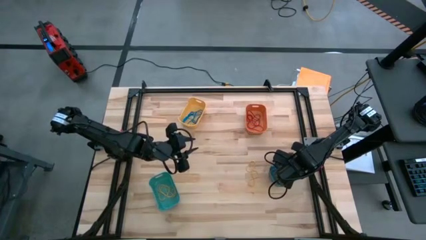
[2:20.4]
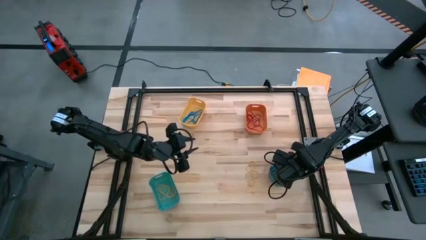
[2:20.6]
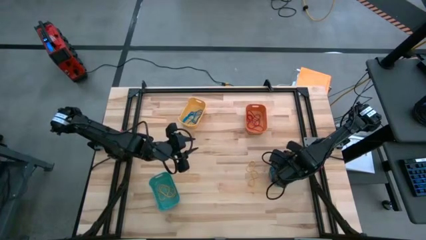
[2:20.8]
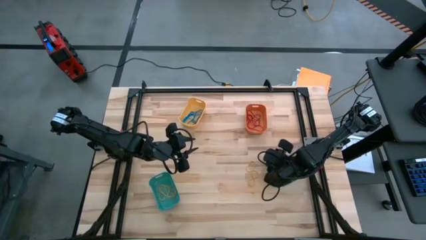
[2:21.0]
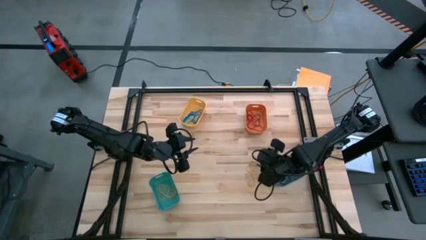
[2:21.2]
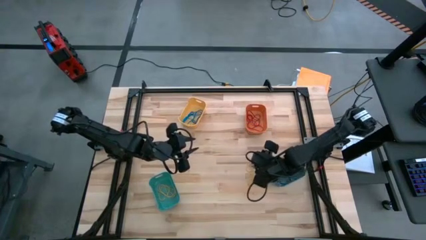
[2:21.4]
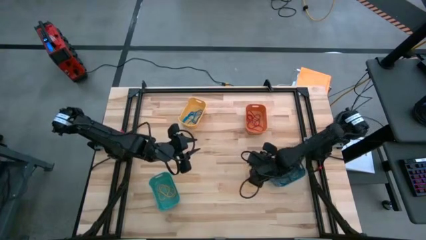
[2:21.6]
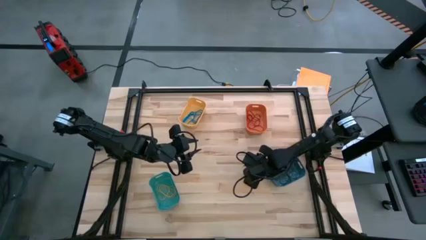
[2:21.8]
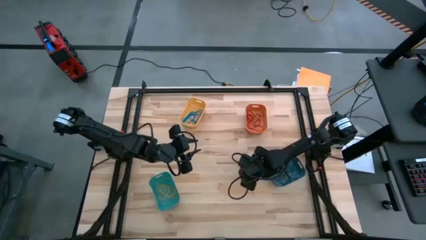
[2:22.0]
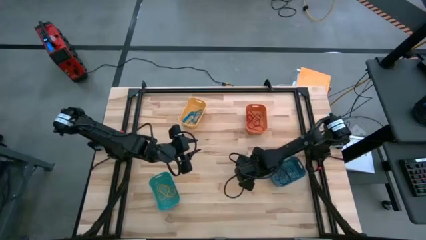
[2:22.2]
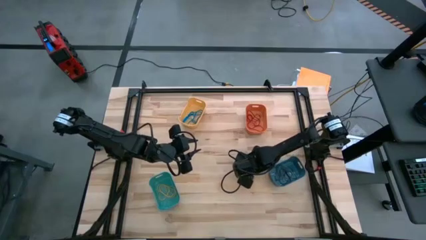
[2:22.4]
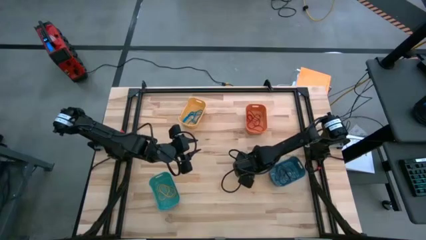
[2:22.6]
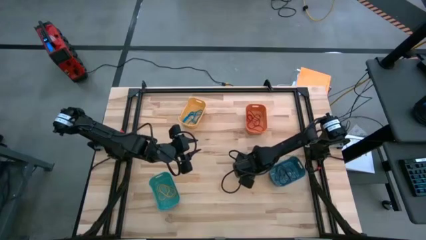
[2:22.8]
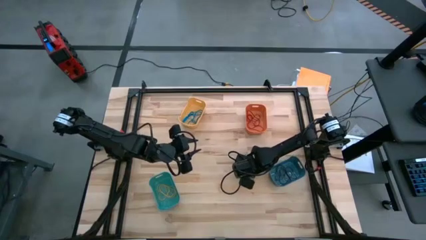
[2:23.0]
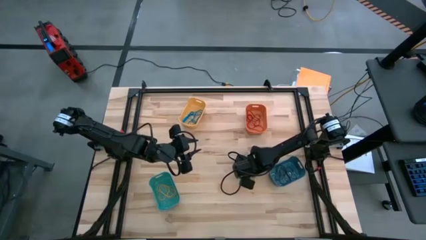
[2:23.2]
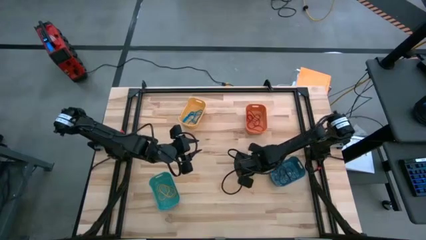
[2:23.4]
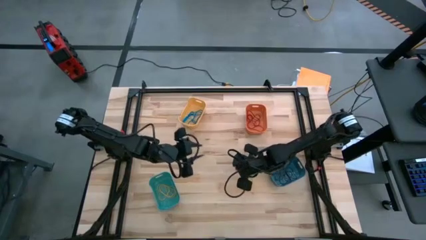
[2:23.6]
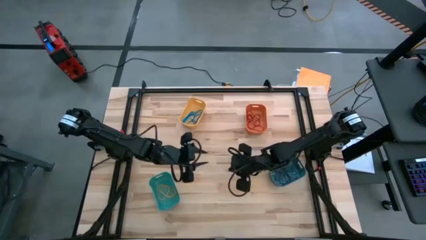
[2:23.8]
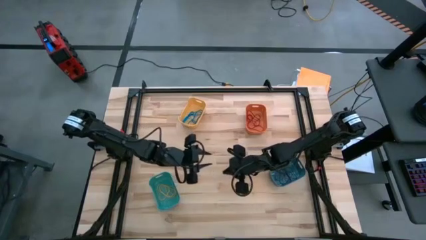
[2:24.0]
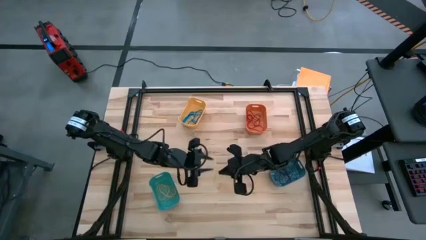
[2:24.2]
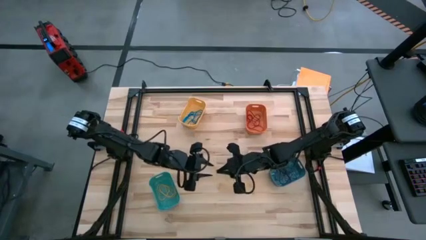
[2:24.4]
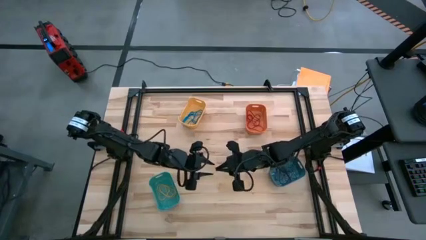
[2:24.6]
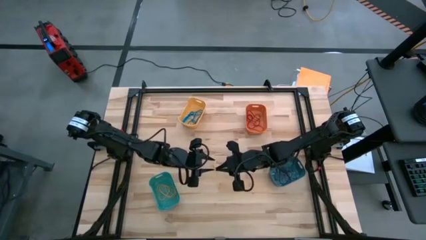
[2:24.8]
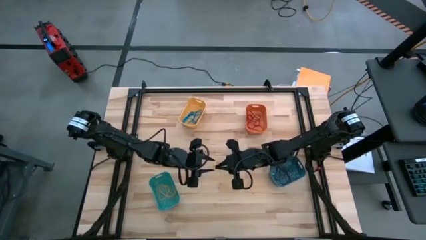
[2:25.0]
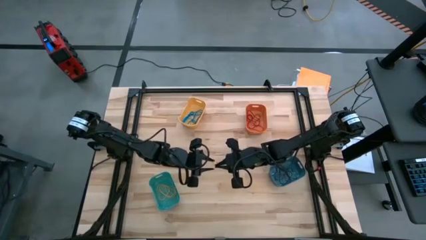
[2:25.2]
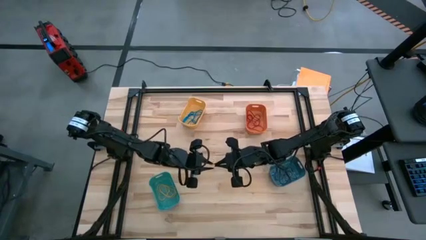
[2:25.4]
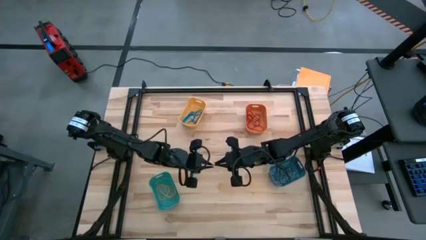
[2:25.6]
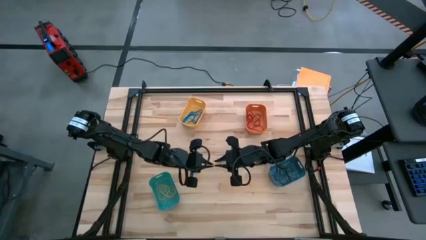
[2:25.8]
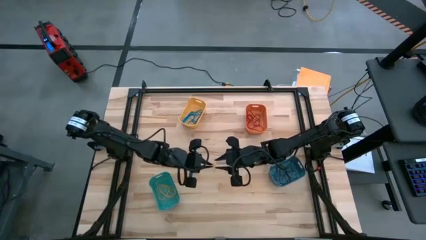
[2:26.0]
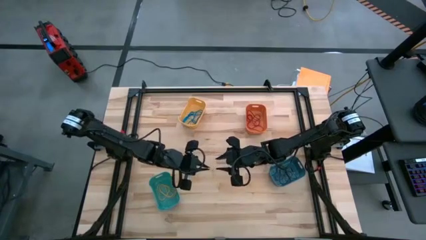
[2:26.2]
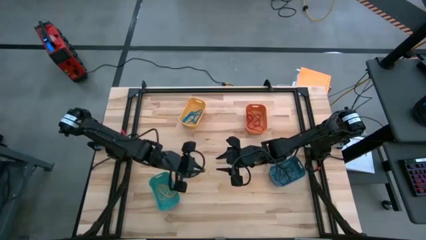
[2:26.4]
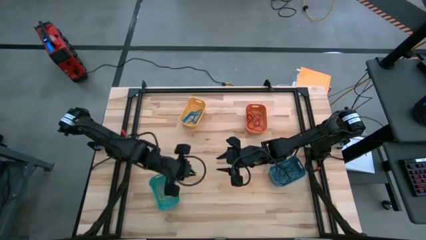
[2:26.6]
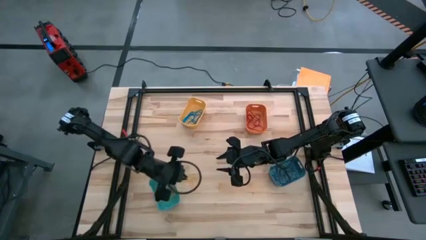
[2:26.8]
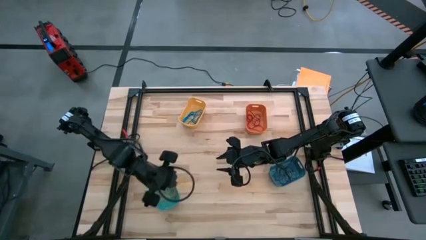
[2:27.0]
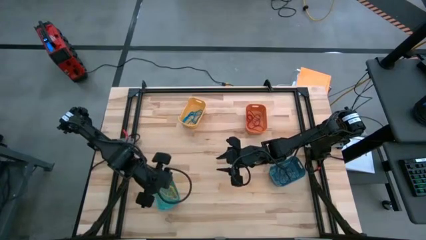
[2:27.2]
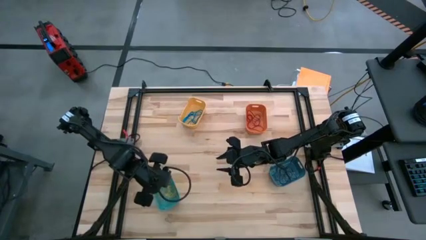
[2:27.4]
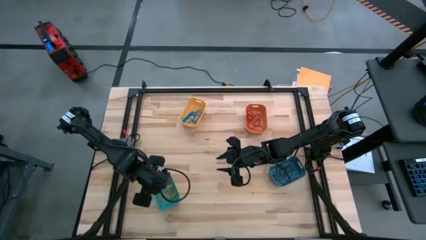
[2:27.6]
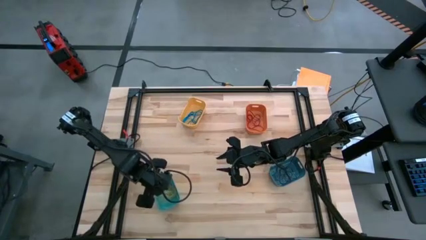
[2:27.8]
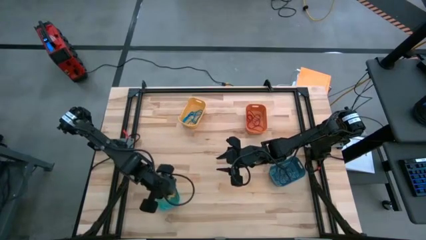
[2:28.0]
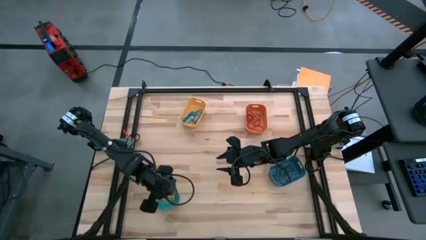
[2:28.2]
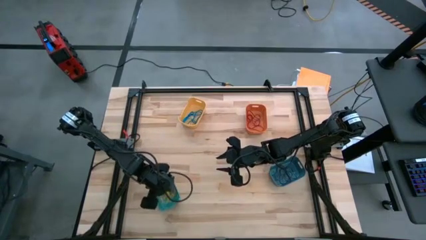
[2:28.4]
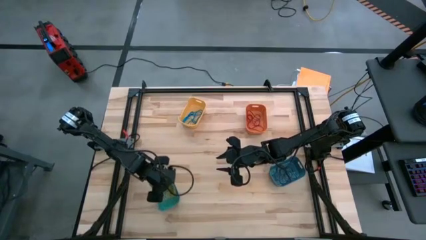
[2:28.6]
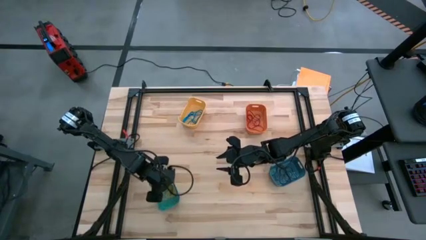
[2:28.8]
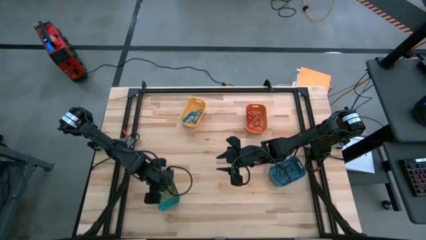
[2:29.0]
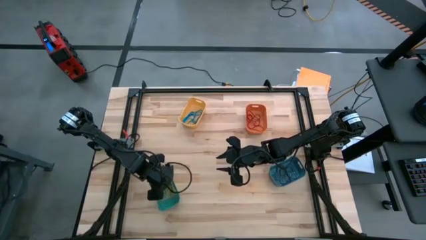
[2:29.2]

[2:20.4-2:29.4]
Task: Sort rubber bands into baskets
Put the yellow rubber band into the green bin

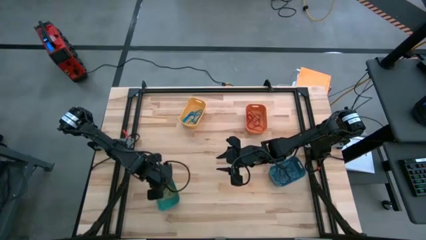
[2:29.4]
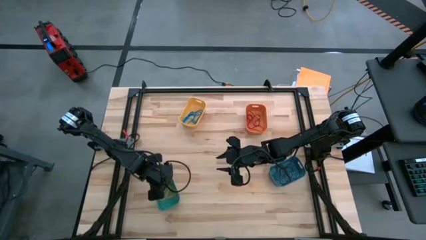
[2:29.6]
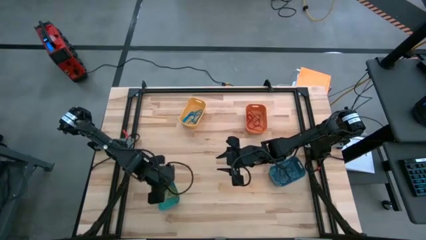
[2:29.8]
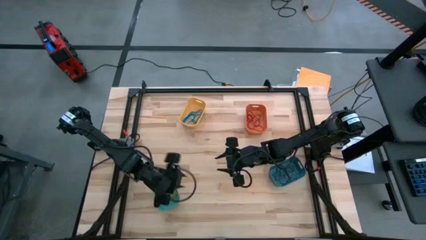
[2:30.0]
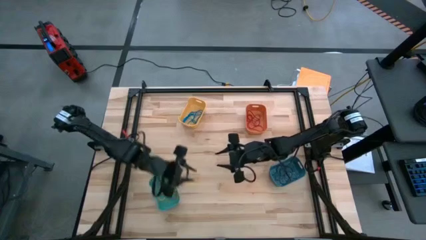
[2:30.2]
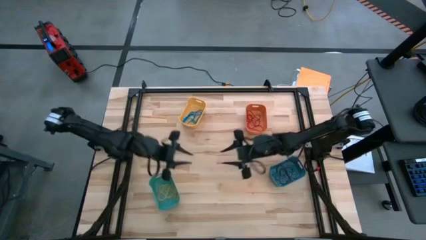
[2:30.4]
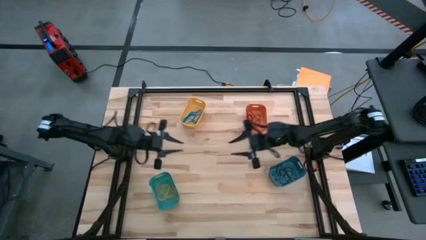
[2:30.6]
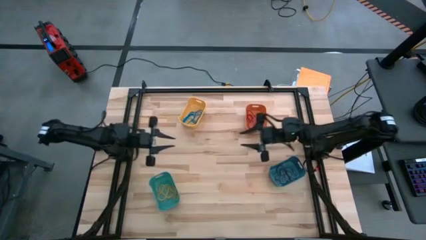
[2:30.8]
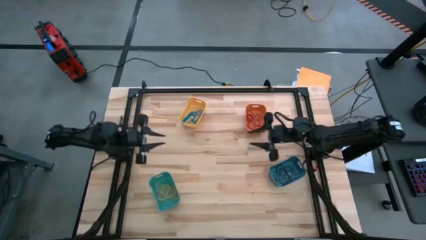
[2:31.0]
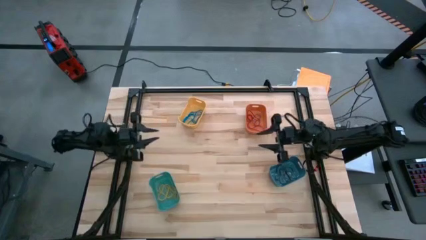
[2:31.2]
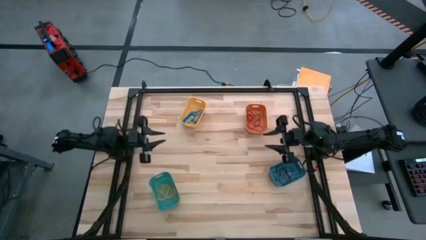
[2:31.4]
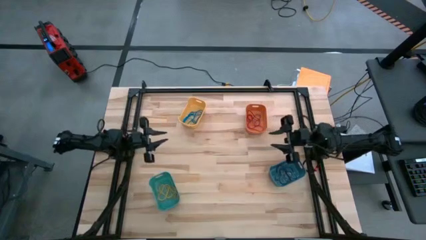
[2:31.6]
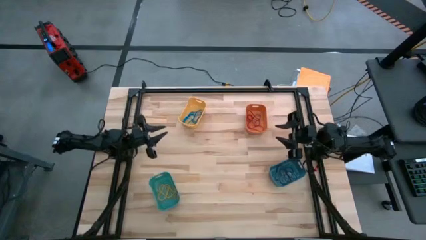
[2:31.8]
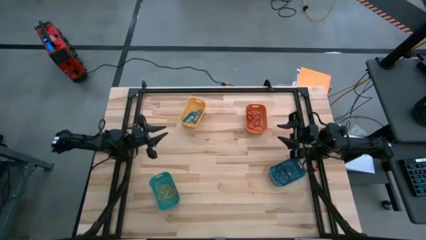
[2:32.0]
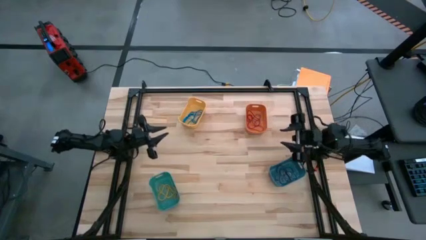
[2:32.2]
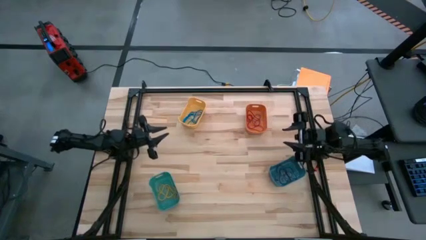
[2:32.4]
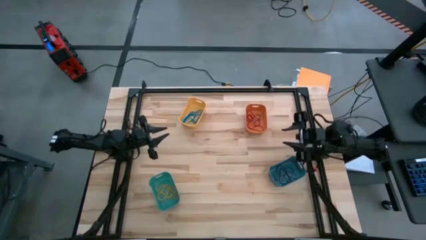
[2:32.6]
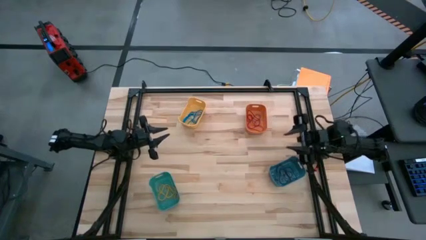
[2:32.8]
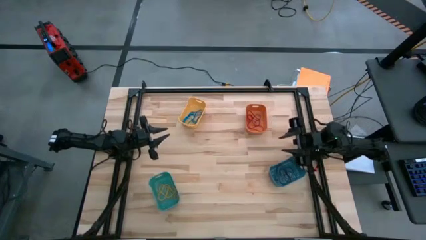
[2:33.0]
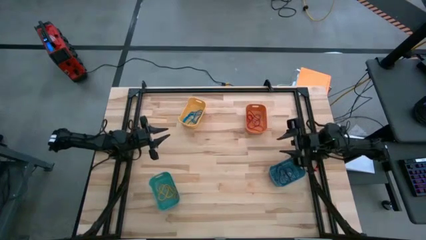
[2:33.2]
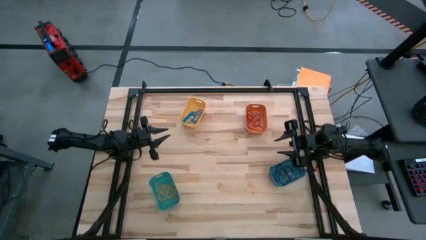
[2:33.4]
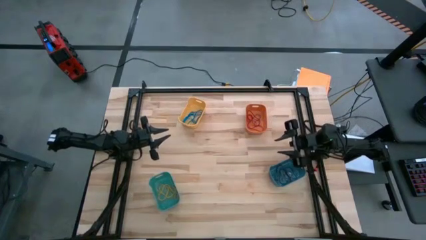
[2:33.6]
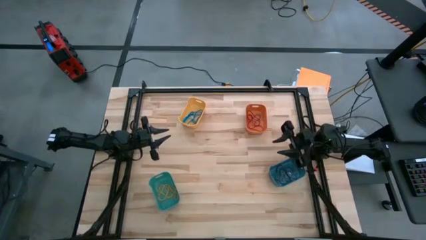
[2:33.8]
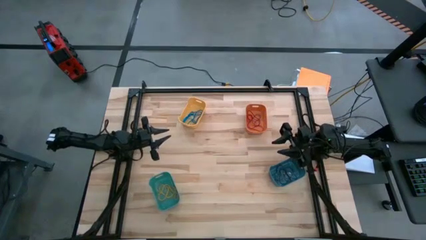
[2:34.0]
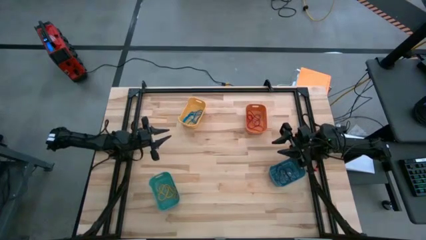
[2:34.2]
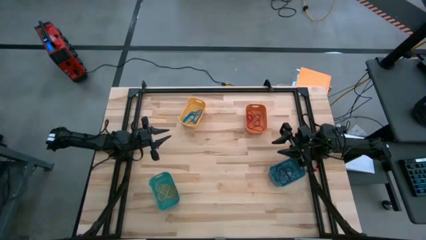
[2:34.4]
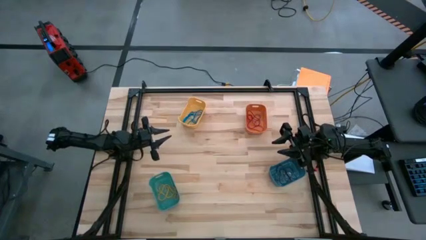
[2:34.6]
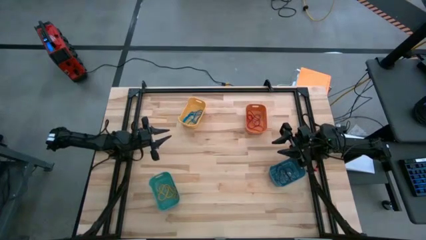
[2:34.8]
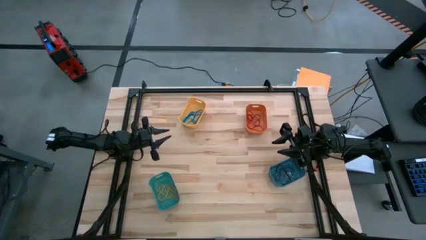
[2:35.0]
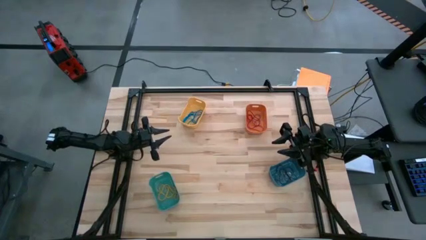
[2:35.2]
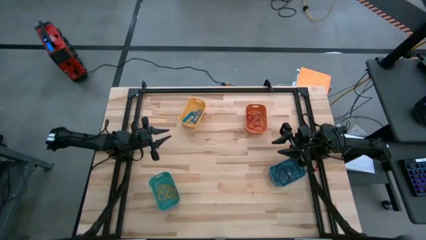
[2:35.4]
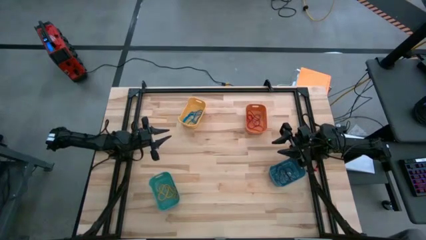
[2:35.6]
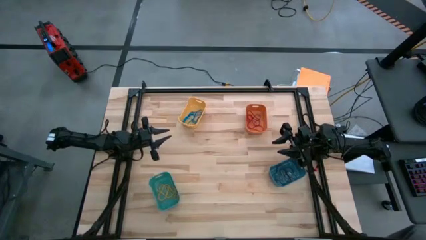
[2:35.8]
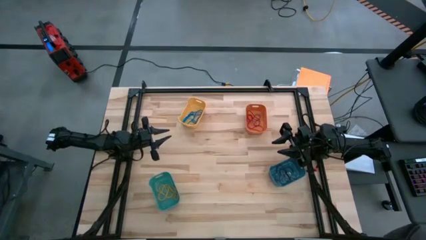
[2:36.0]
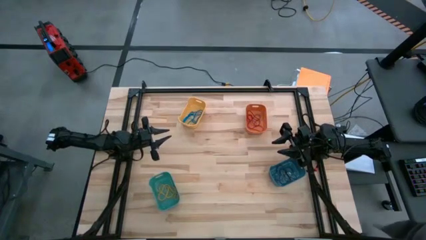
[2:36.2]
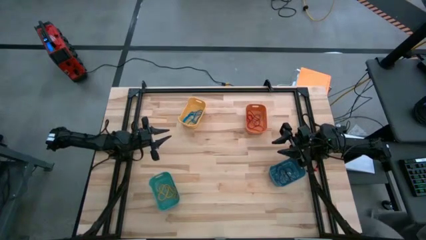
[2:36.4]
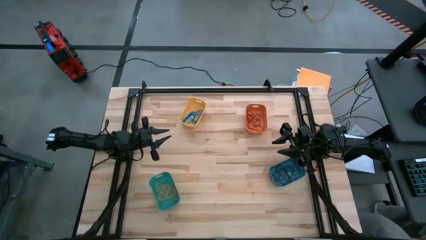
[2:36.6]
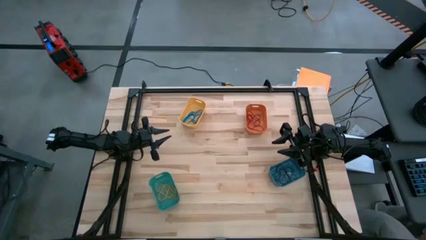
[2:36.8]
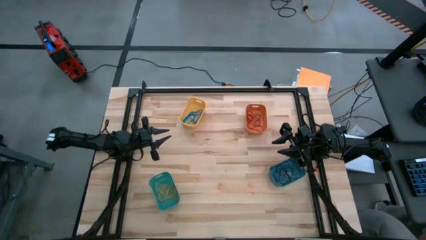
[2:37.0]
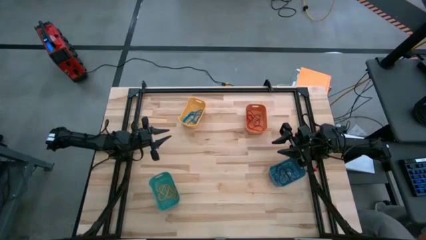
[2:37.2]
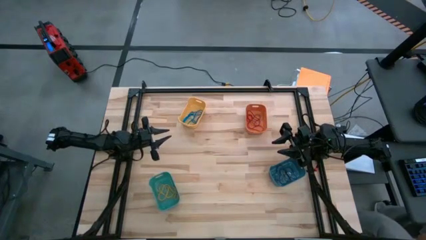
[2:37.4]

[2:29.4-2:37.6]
Return to Home Position
